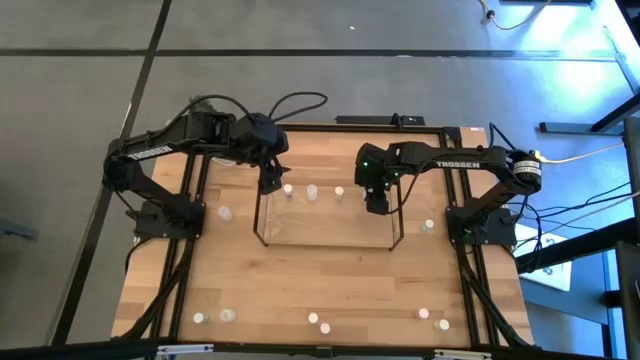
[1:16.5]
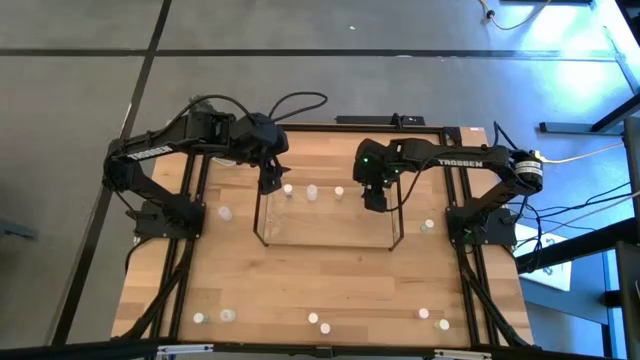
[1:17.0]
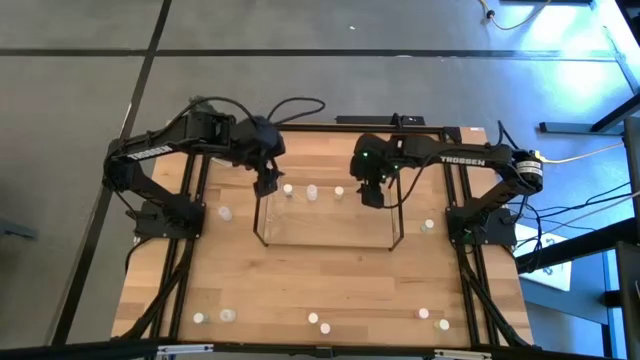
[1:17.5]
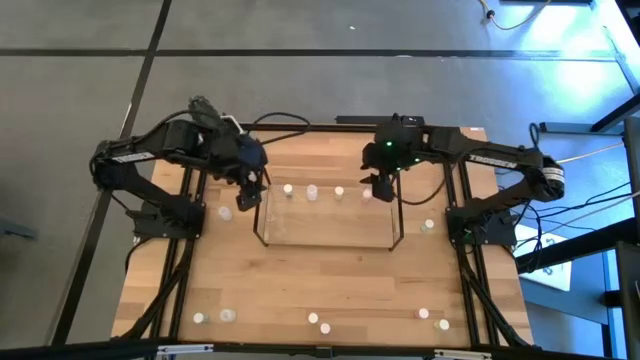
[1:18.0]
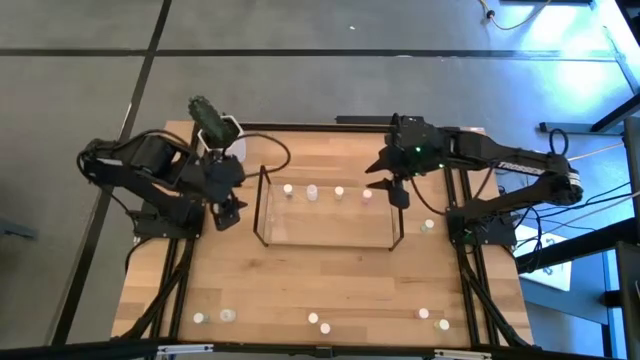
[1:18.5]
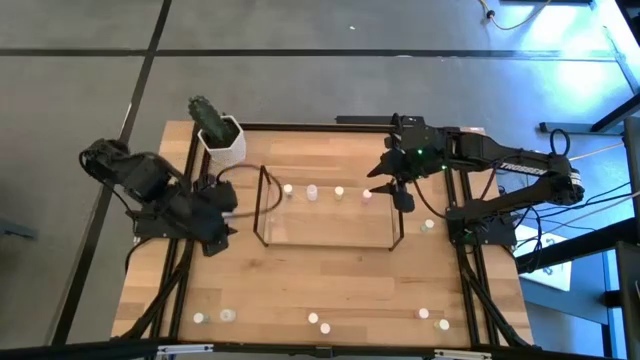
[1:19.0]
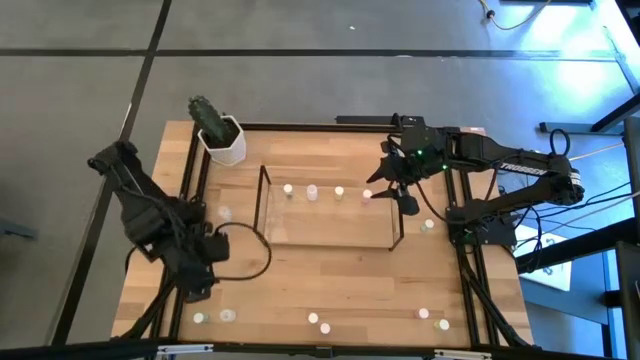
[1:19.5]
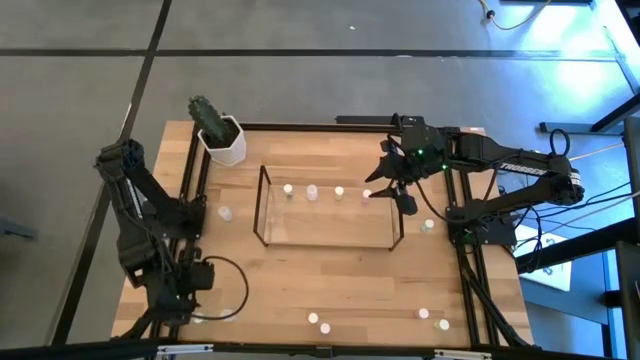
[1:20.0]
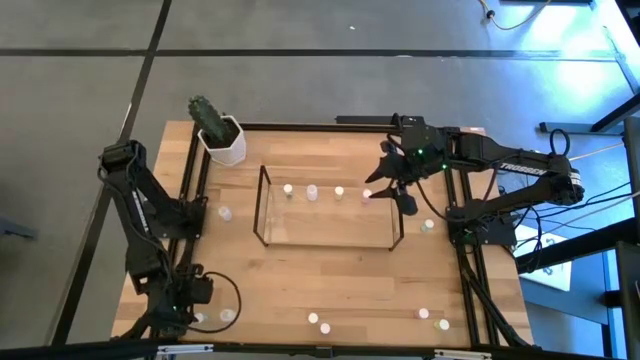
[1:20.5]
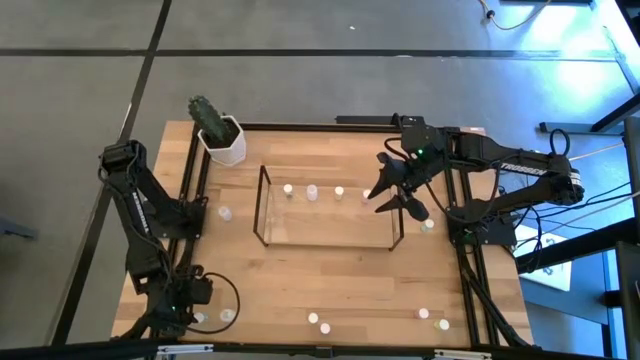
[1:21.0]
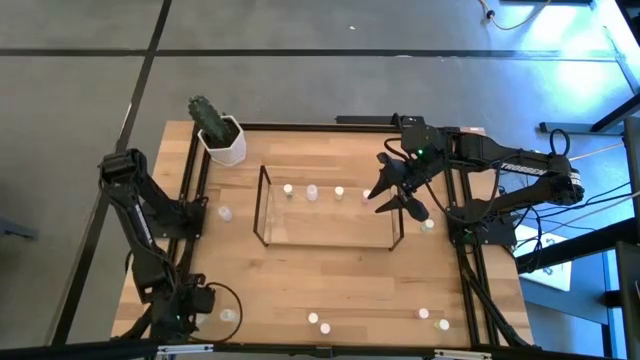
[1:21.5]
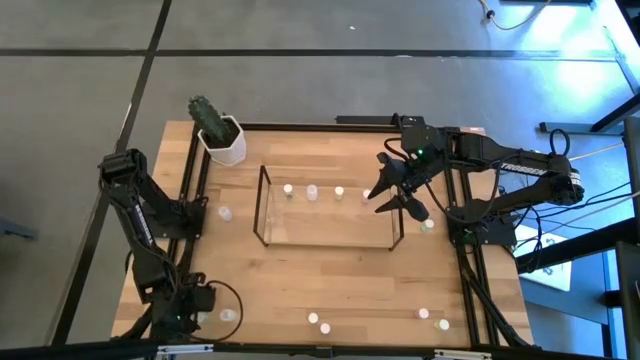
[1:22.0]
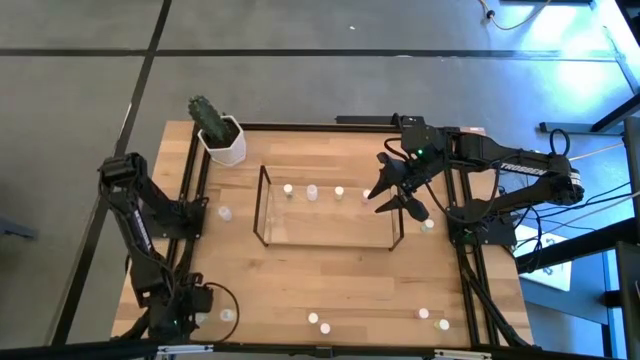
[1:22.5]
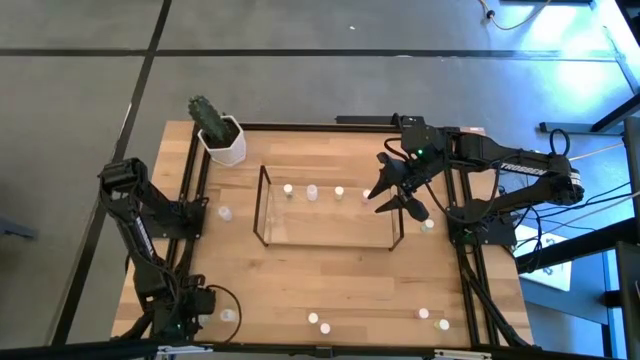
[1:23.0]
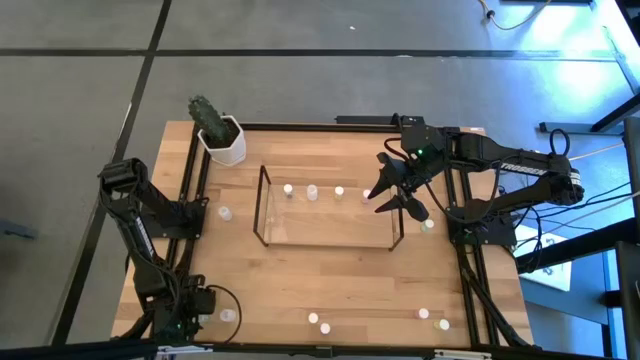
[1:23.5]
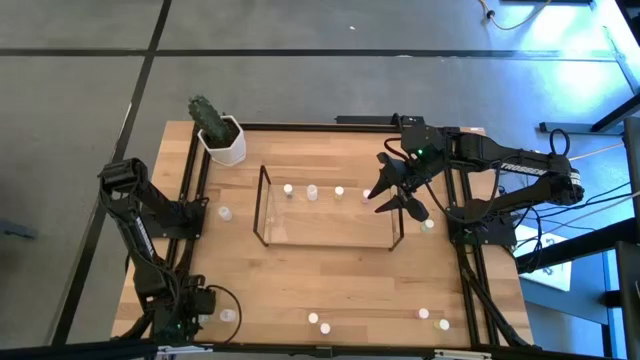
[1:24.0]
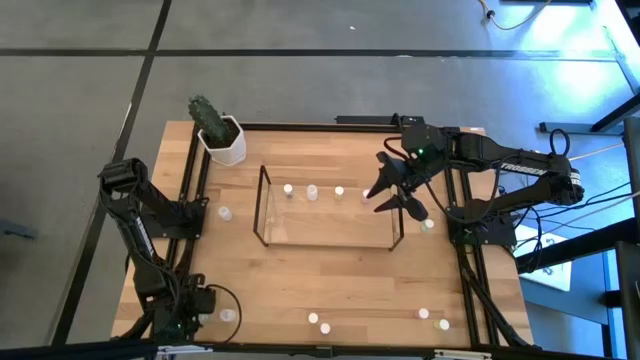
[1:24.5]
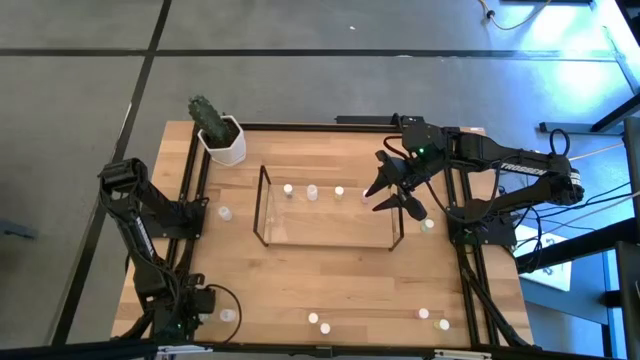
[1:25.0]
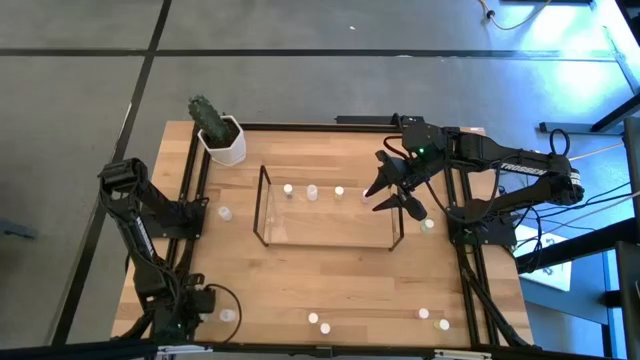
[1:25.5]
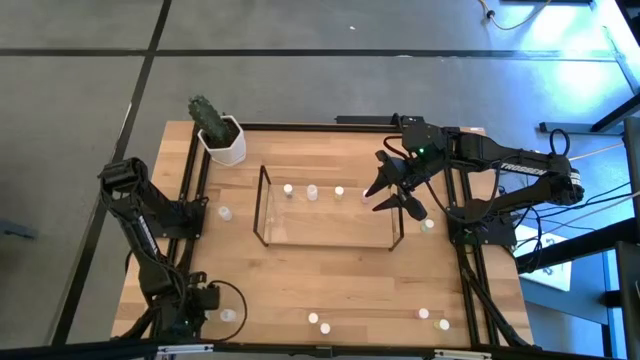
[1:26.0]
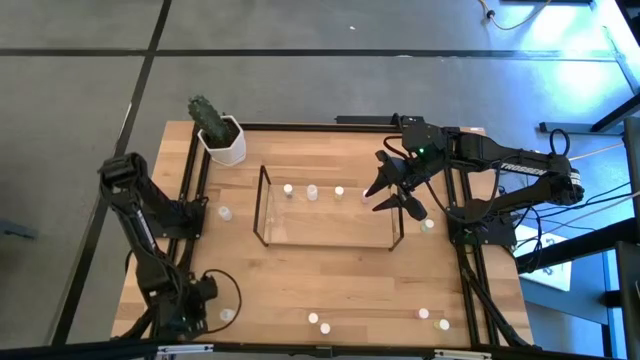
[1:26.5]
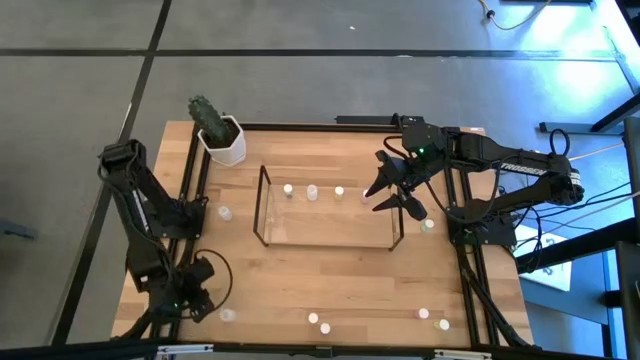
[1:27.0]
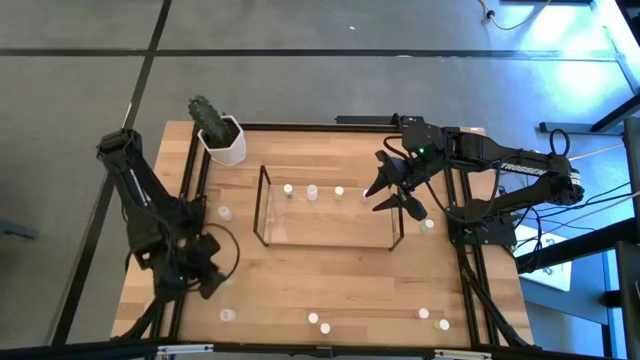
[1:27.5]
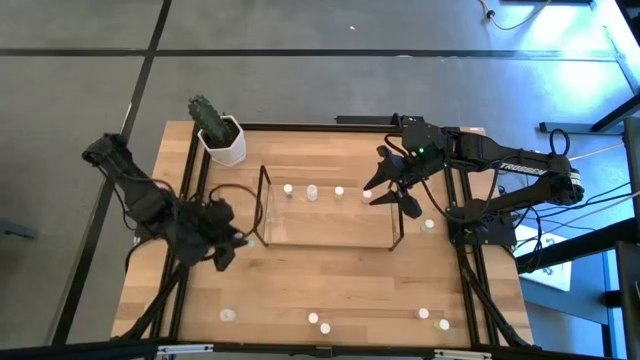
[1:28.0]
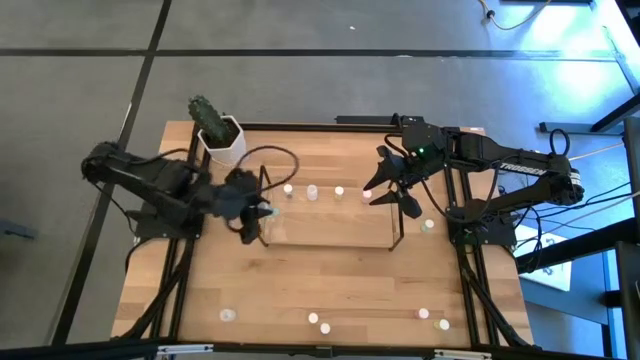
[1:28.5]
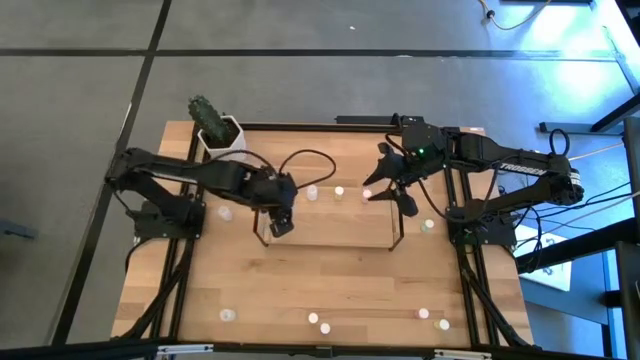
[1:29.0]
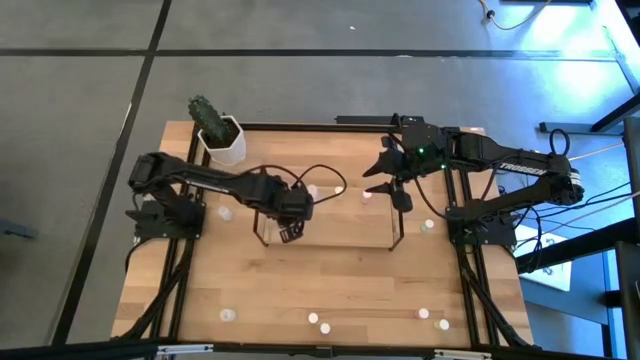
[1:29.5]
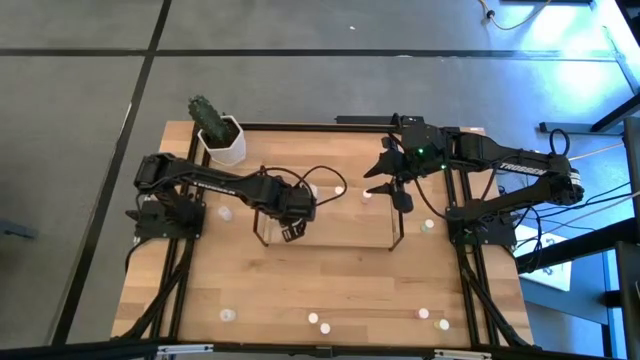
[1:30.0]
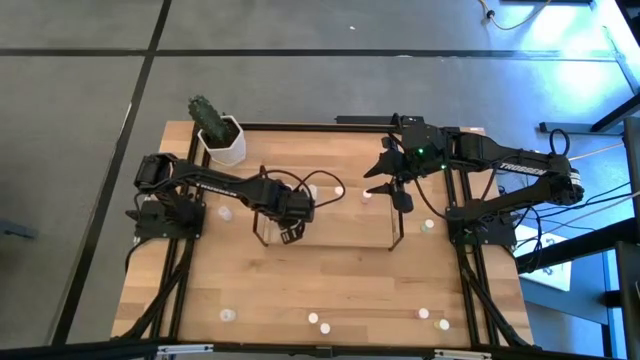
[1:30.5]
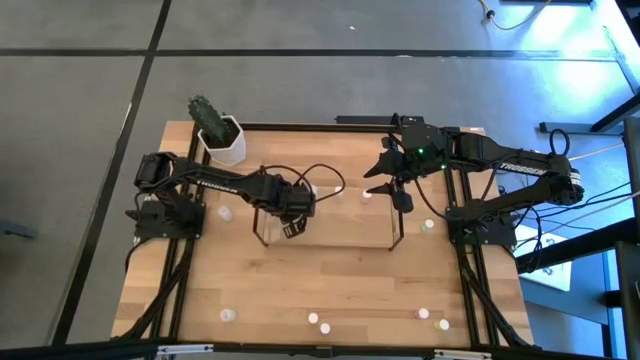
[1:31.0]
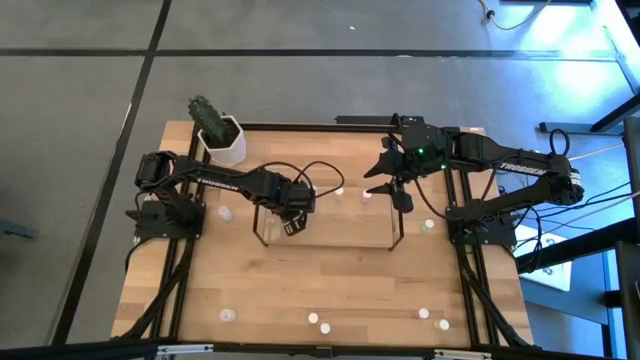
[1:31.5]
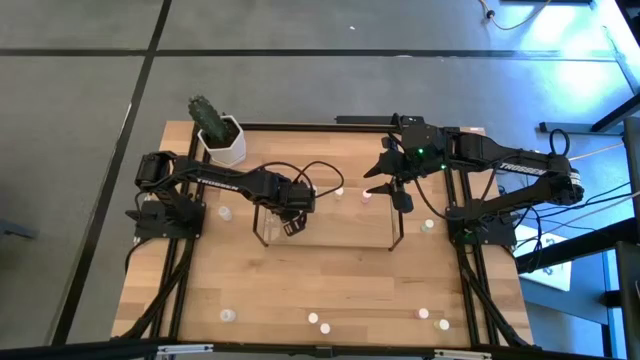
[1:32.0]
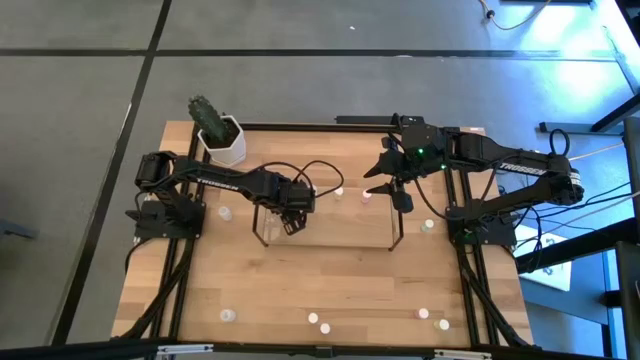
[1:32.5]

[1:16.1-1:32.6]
Task: Pick and place medicine bottles onto shelf by color
Put the bottom blue pill bottle aligned with the other blue pill bottle on the shelf

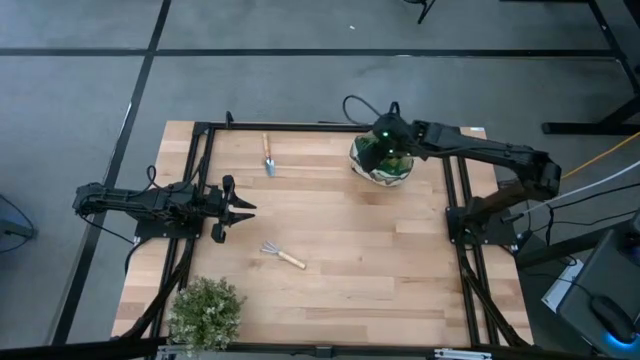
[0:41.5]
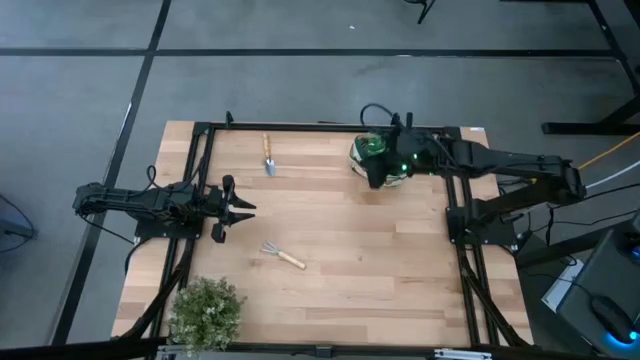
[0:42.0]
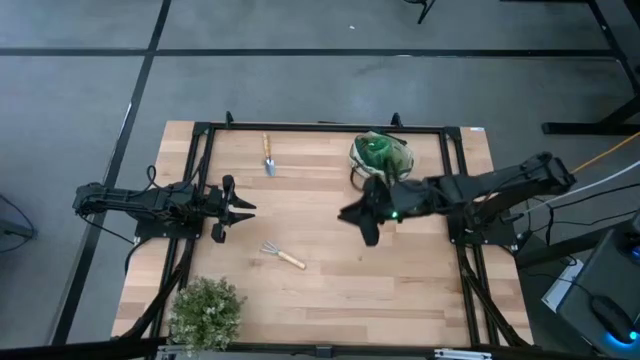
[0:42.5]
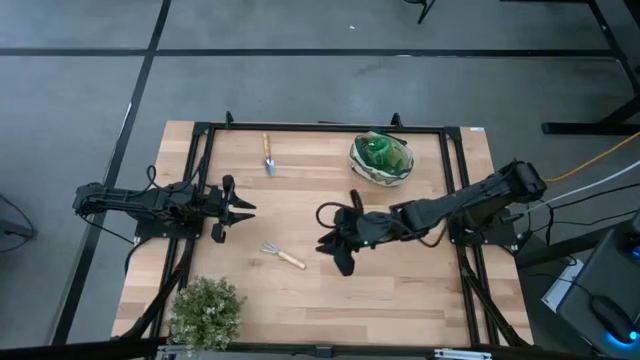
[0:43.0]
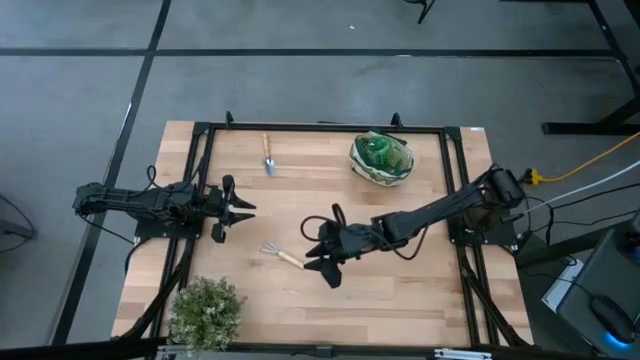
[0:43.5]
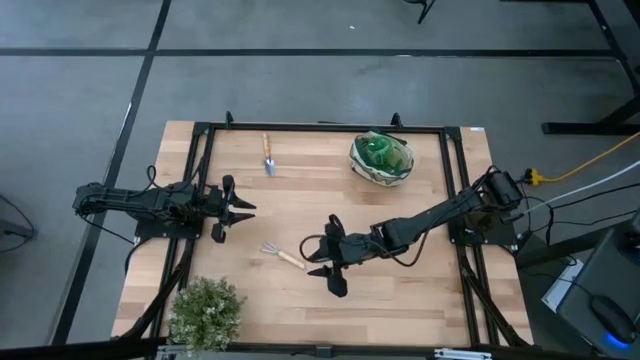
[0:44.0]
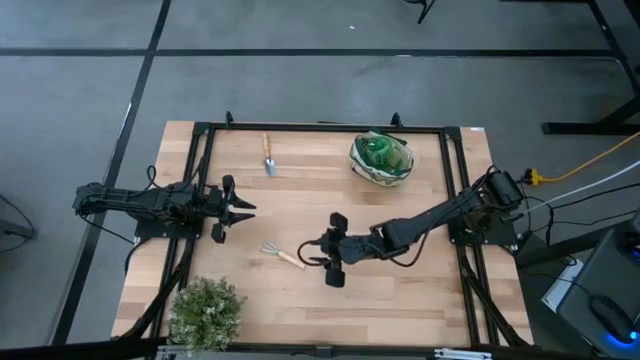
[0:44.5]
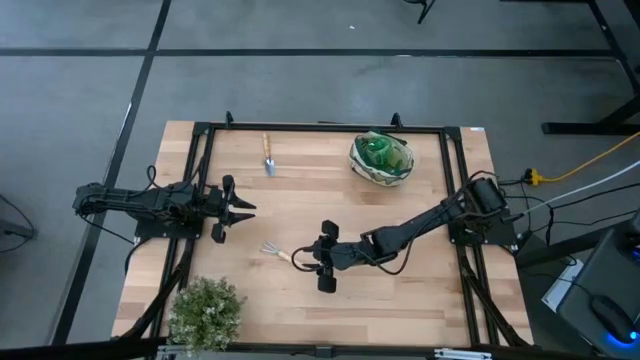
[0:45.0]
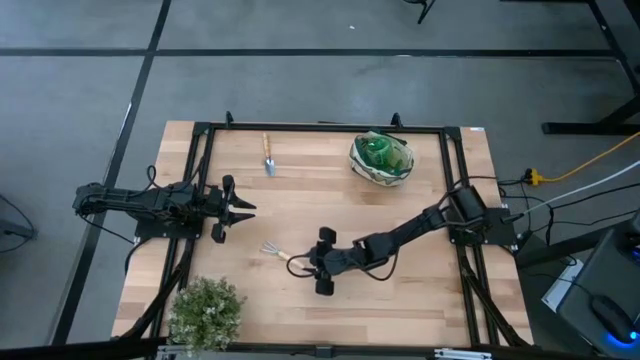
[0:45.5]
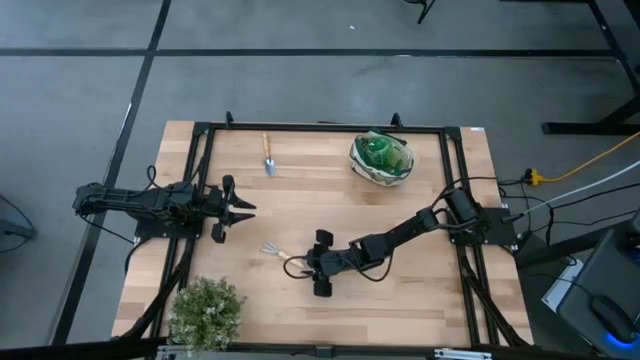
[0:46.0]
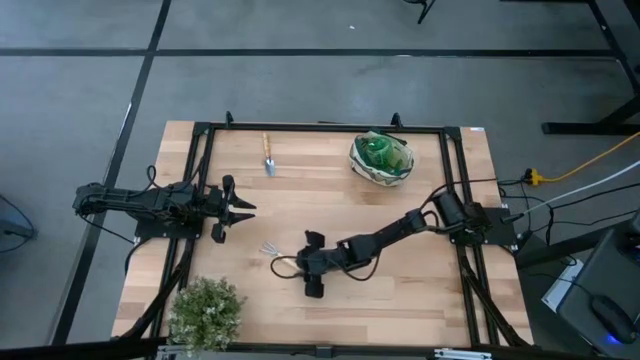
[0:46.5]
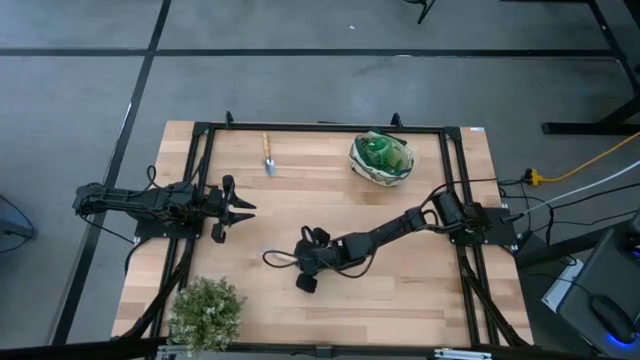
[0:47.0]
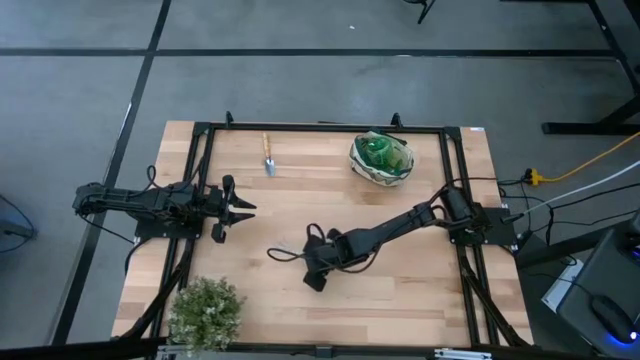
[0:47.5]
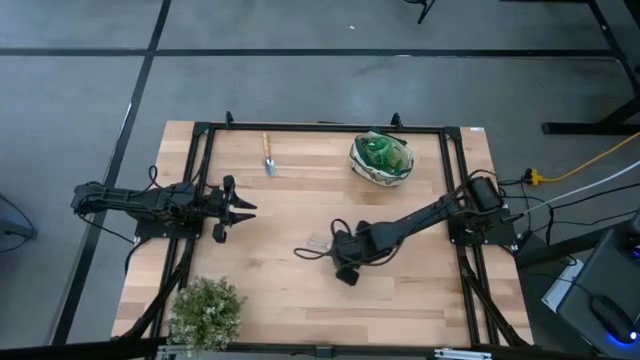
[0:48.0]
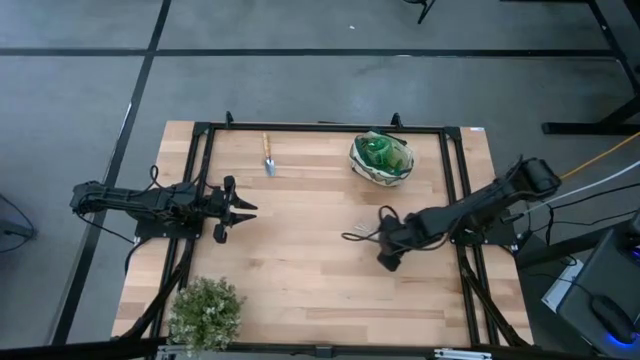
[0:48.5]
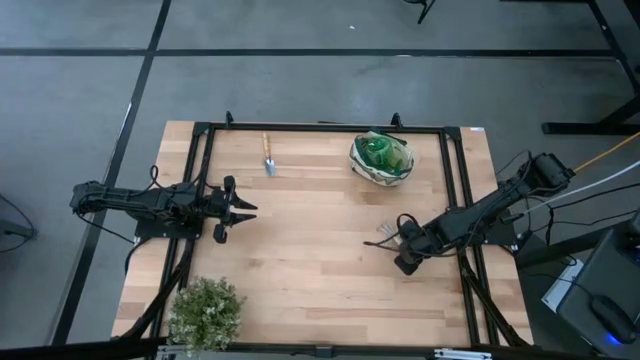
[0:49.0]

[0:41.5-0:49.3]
Task: Pick & Place Garden tools in Gardening bag
Move the mini rake to the center left of the table
